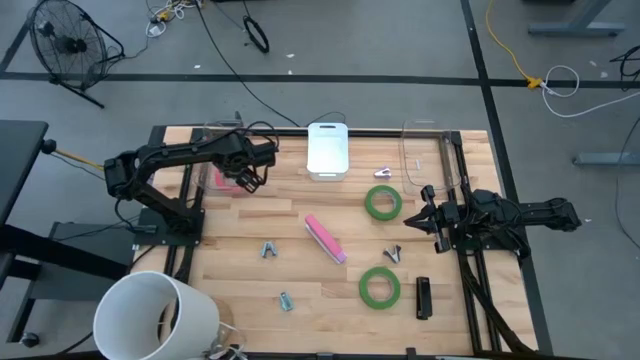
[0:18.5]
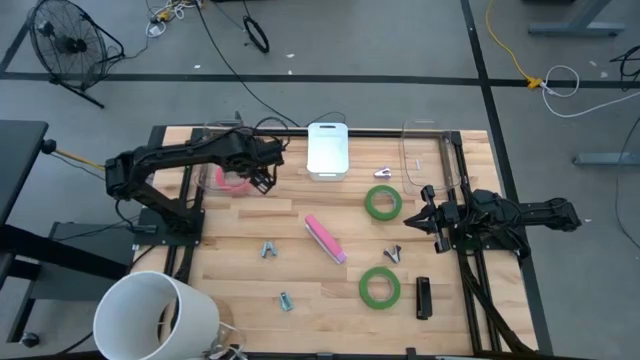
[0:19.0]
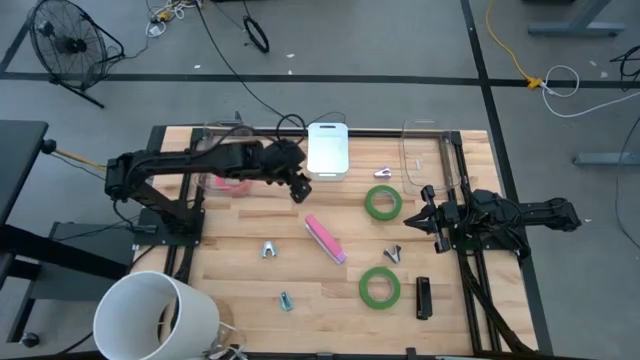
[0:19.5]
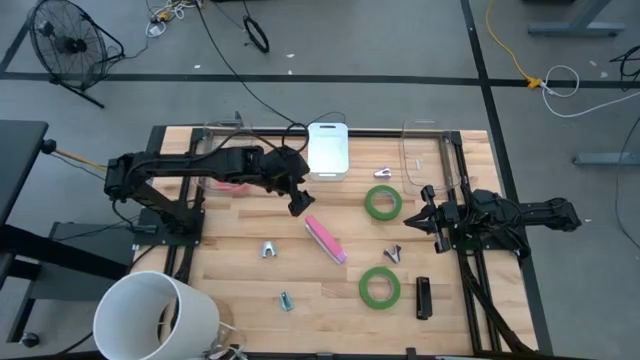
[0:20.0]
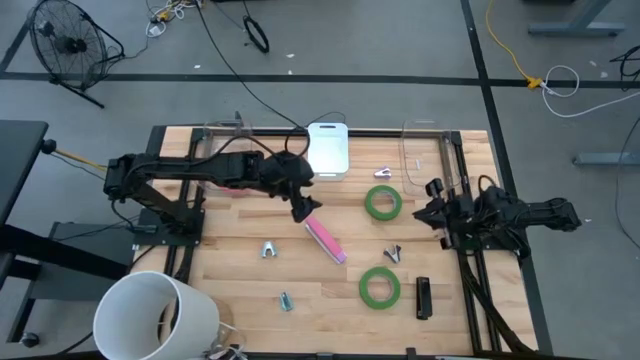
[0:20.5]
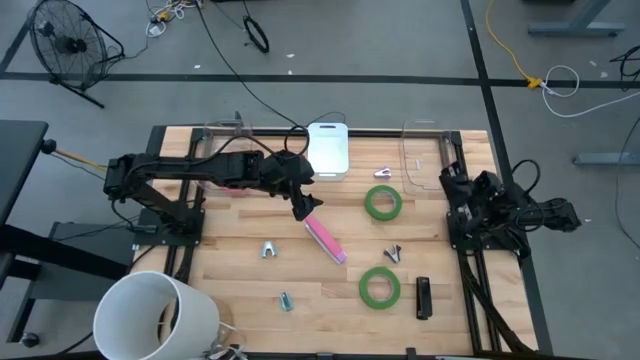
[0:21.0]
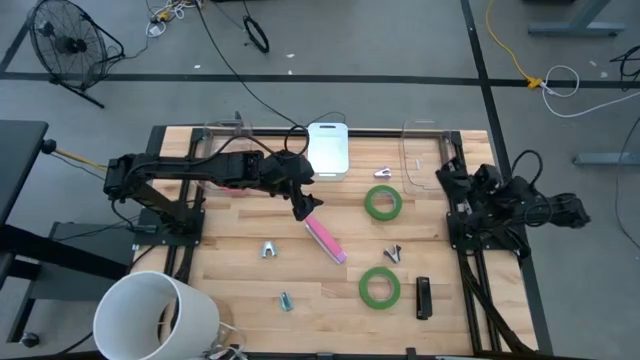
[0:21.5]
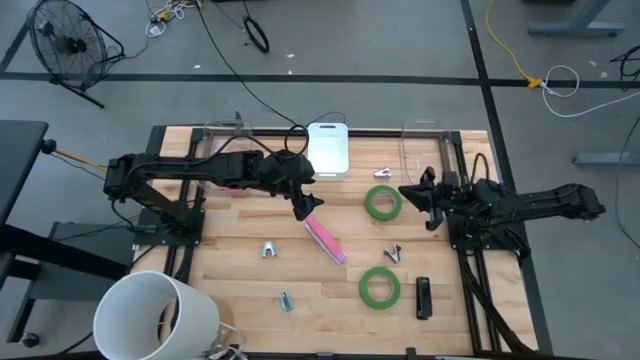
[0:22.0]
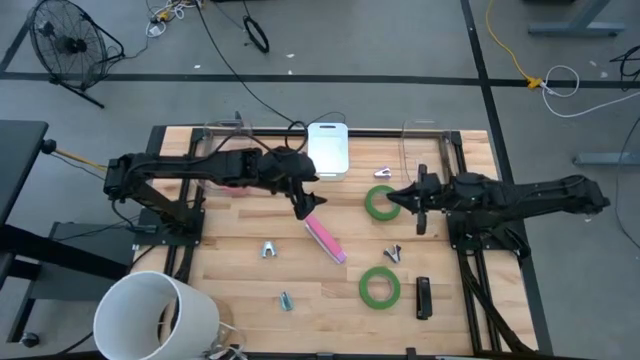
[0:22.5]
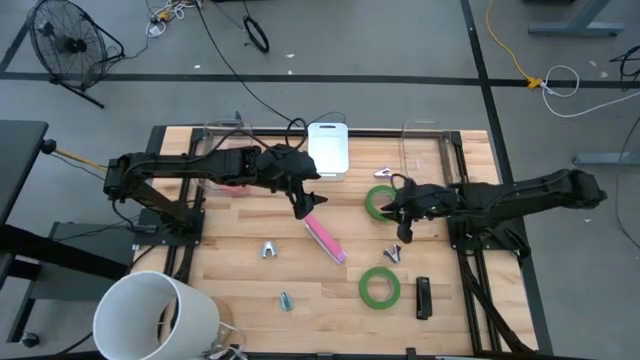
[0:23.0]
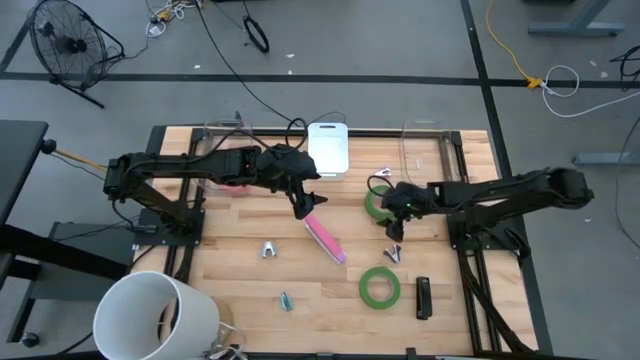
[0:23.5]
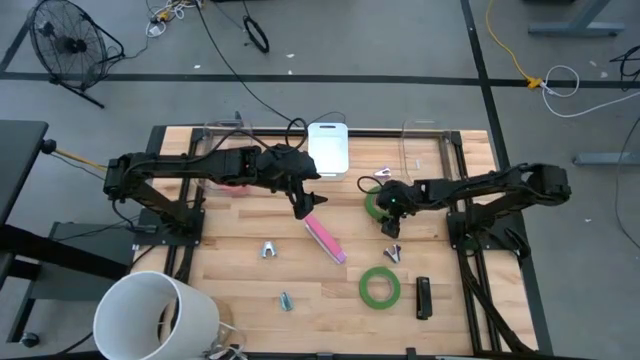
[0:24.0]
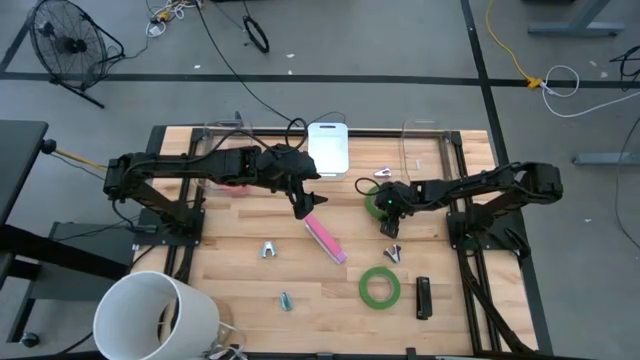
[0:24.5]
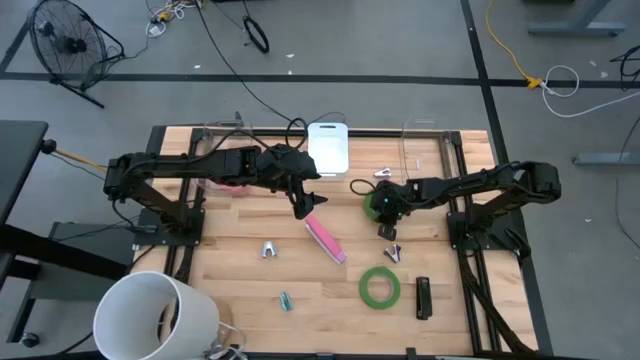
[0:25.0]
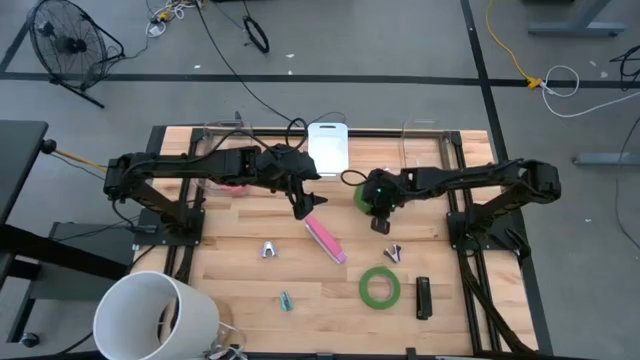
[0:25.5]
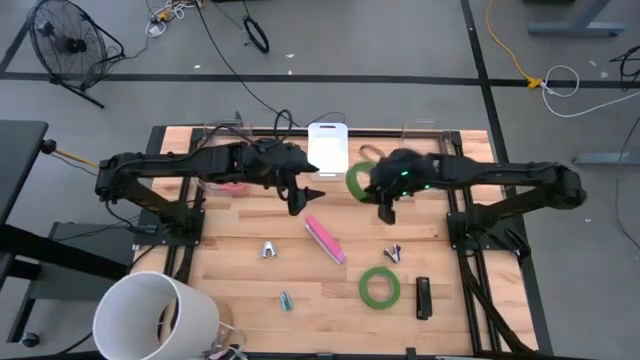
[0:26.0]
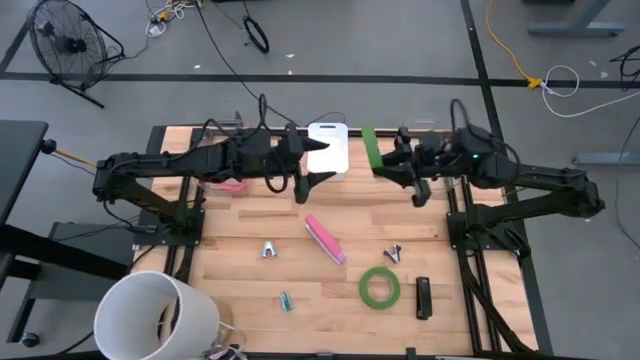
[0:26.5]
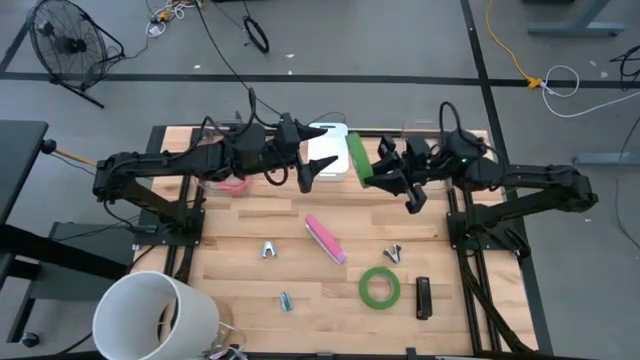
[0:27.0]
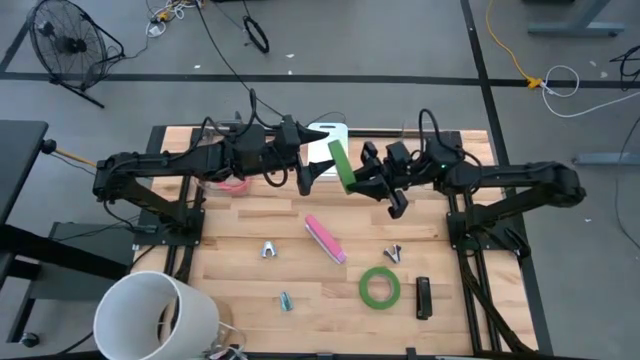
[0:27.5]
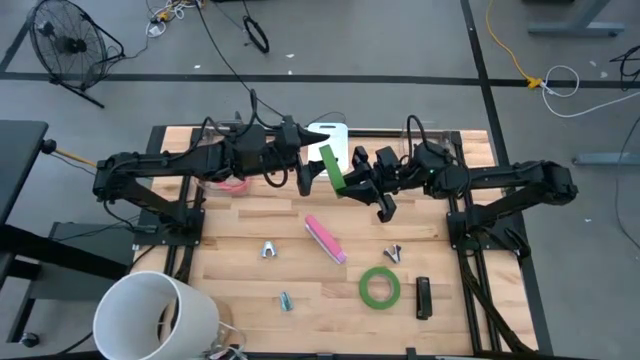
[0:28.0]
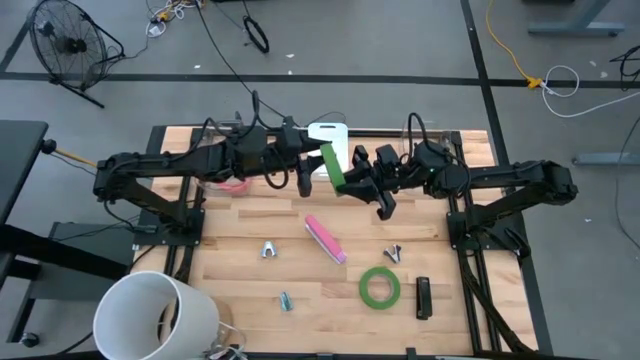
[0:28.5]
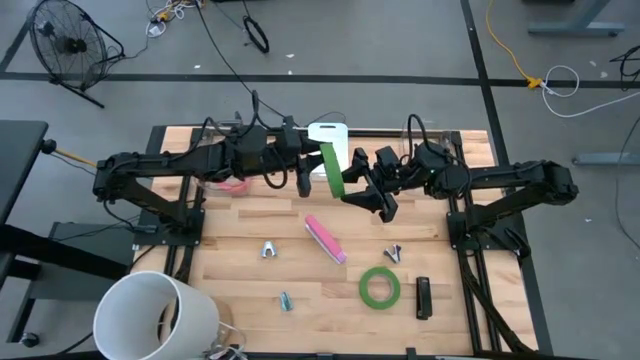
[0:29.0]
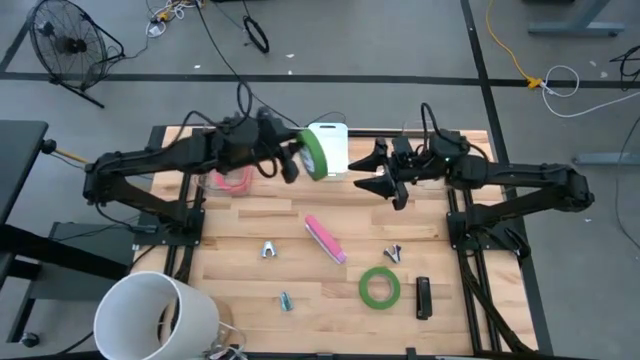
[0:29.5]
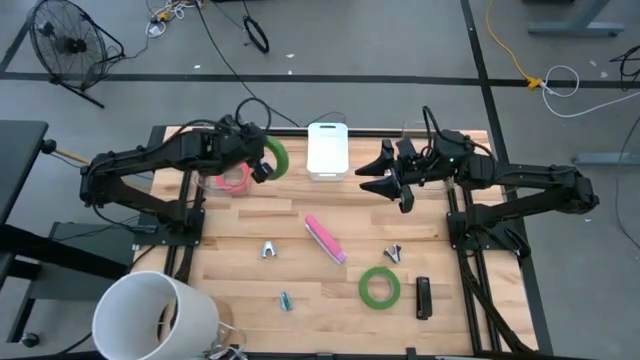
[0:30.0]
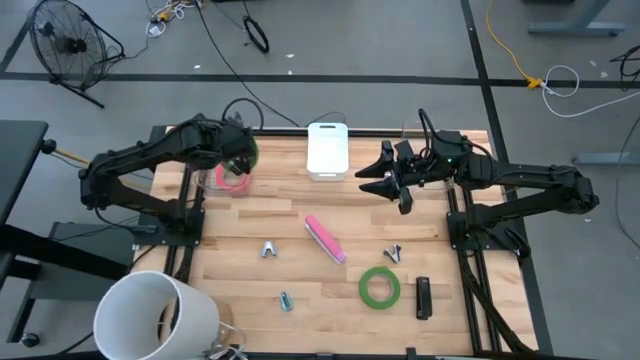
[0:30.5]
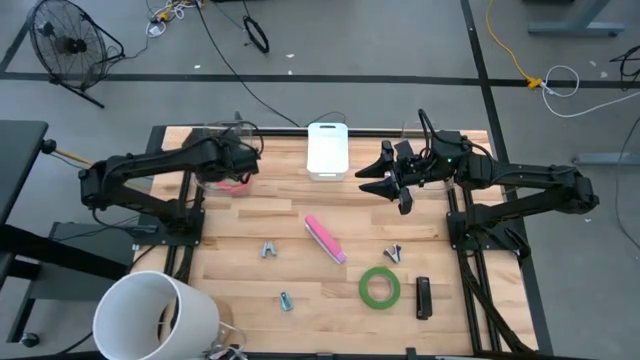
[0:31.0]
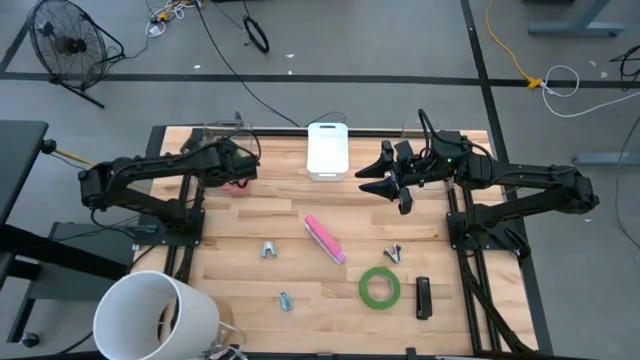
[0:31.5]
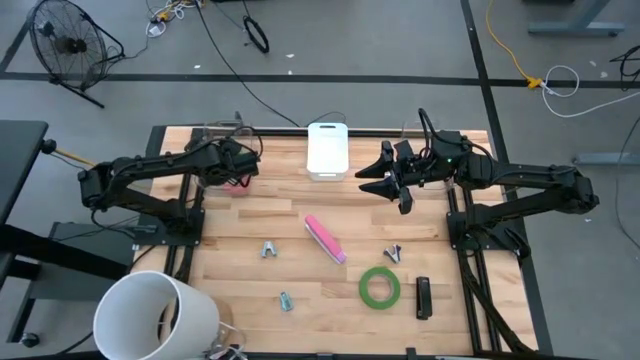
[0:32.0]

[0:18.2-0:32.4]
Task: Pick and place Stapler, Stapler remover, tape
Put the top green tape into the left transparent bin

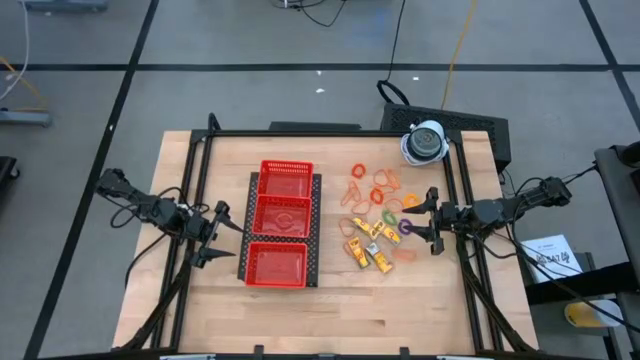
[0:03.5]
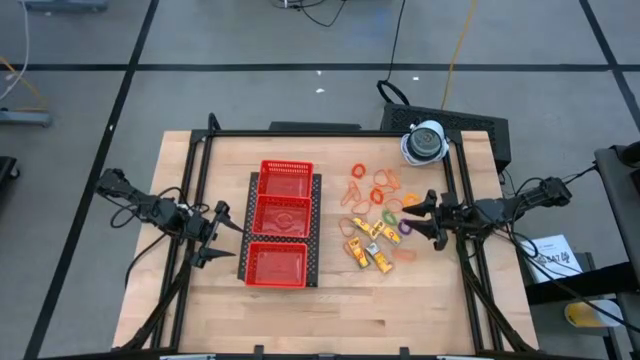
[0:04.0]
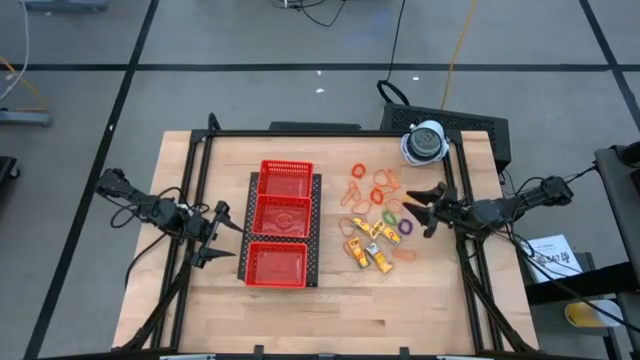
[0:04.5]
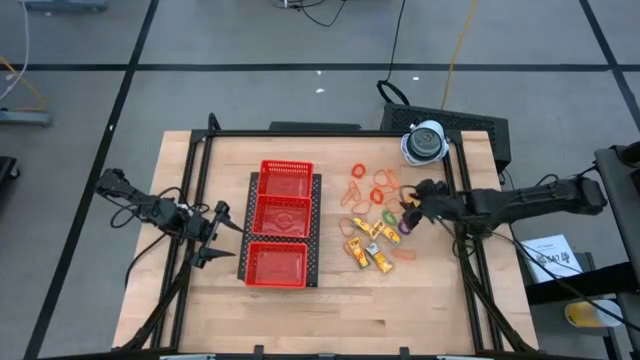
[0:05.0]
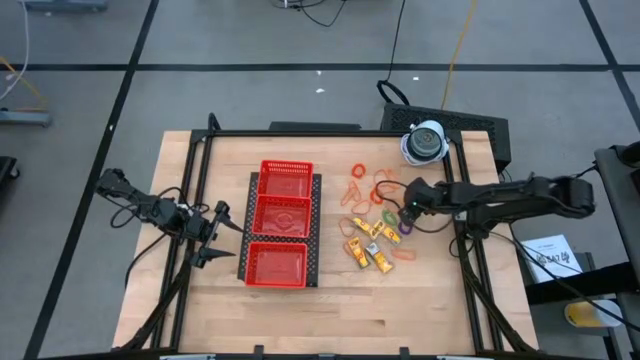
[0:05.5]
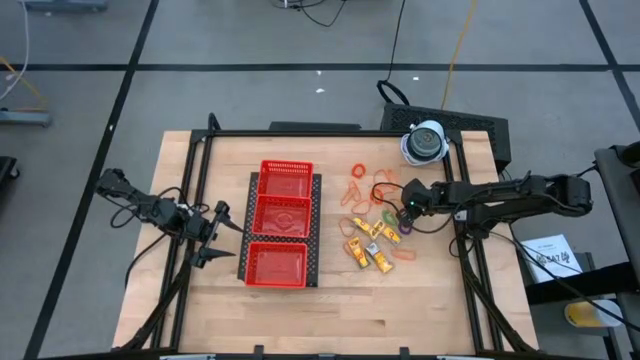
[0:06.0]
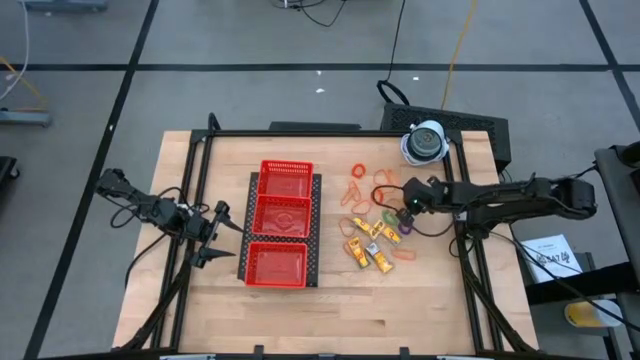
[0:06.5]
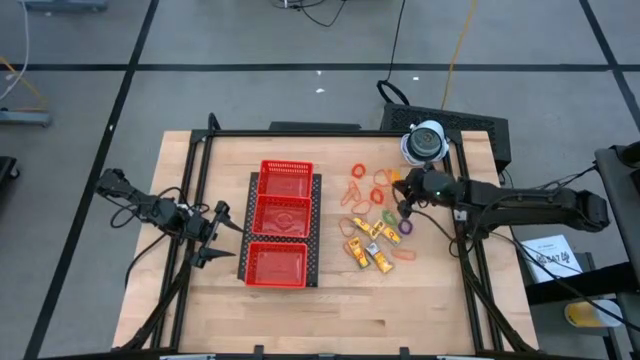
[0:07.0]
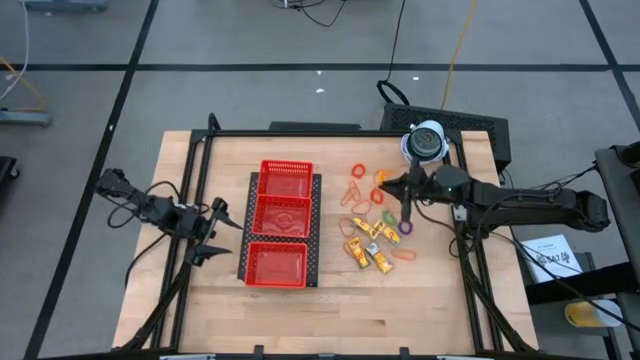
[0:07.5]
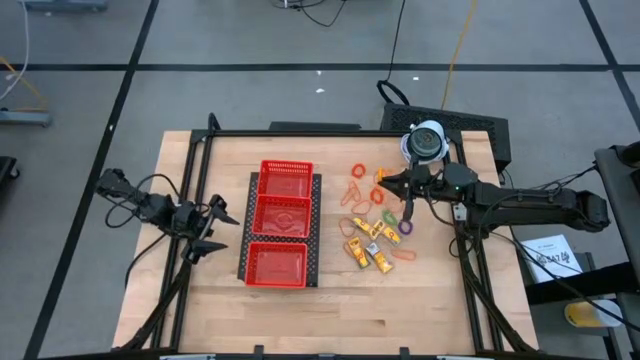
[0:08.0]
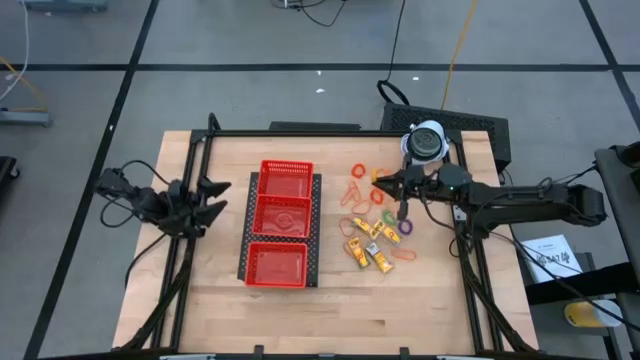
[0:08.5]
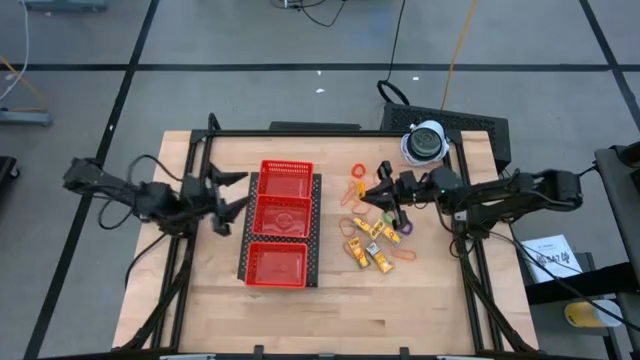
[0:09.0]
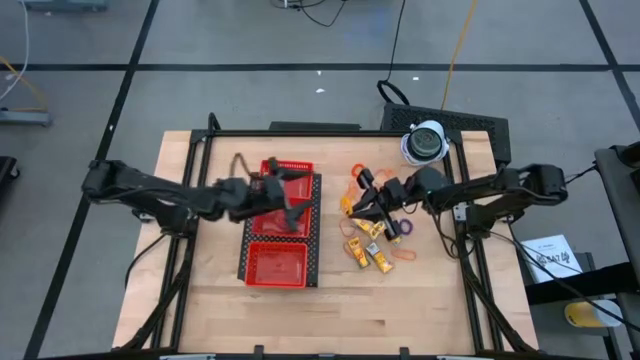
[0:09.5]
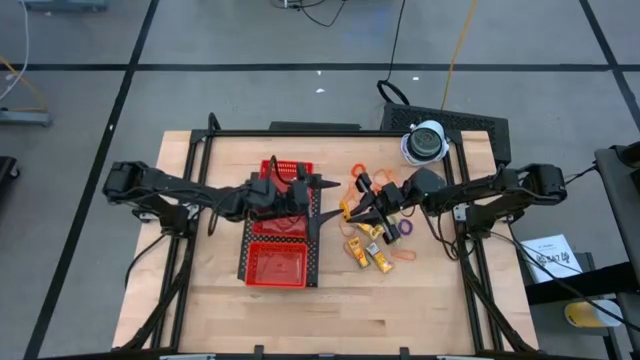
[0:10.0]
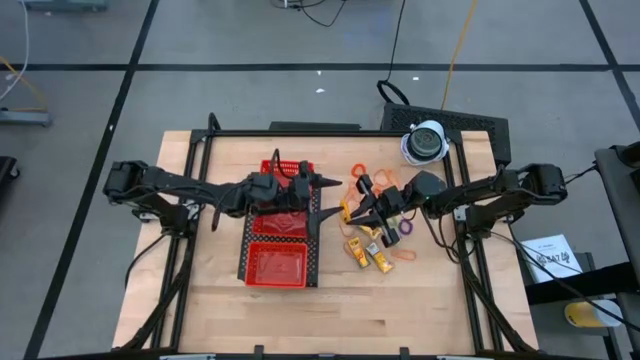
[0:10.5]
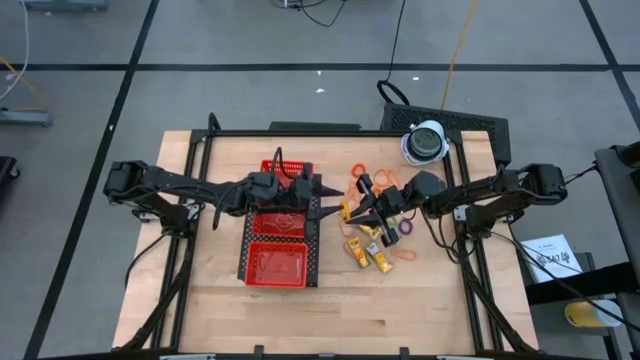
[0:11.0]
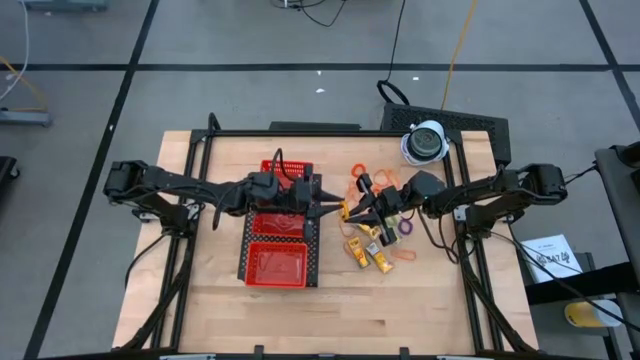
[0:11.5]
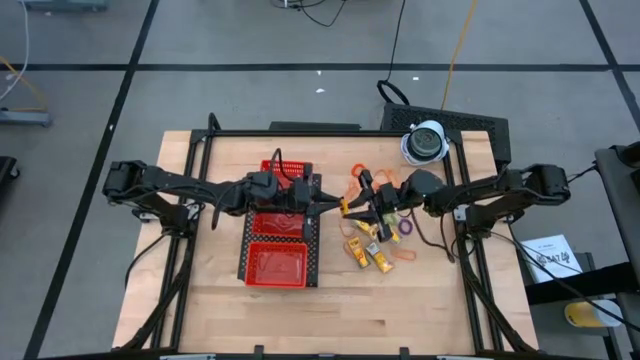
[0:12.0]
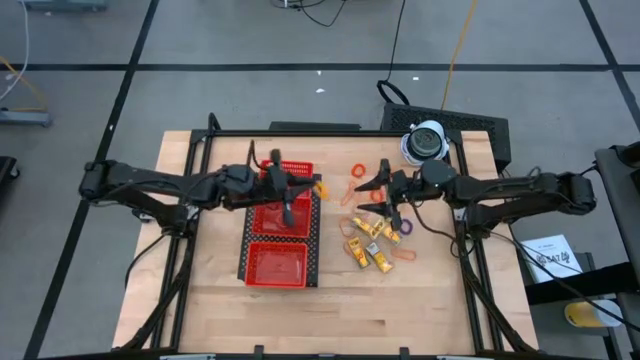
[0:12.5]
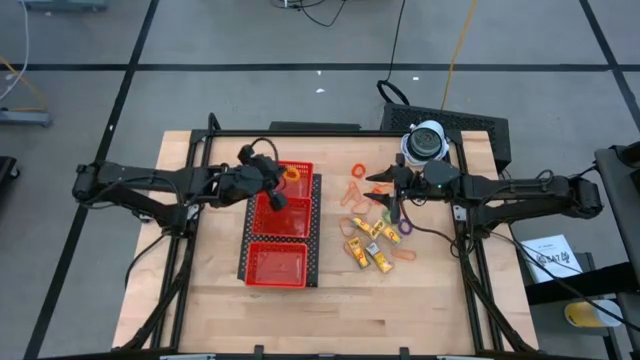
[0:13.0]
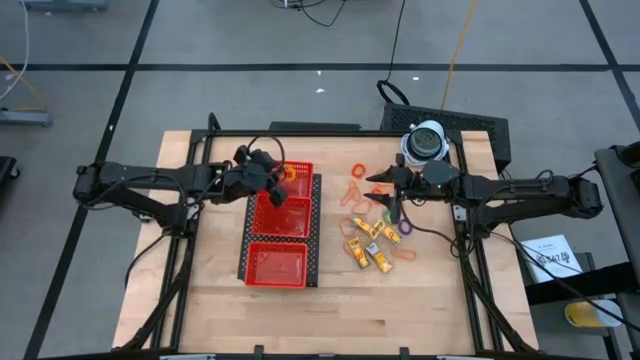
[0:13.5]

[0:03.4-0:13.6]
Task: Pick & Place Office Desk Supplies
Put the yellow spring keychain into the top red basket on the shelf
